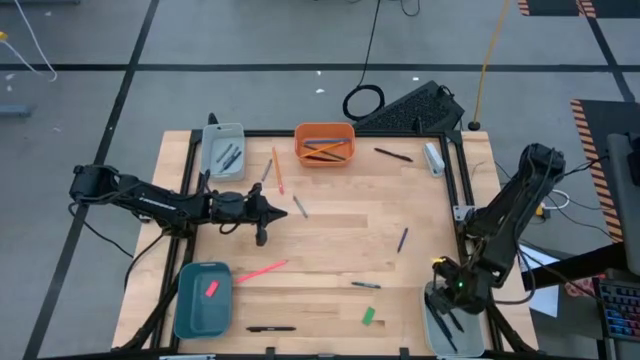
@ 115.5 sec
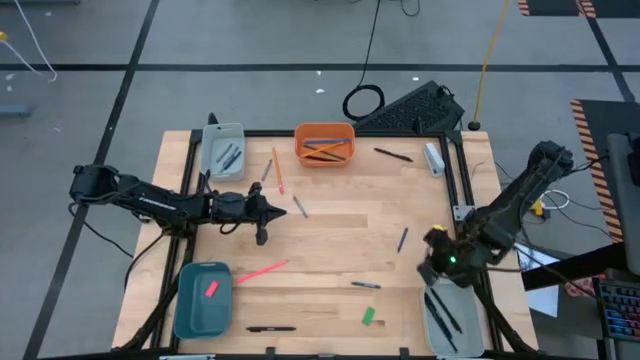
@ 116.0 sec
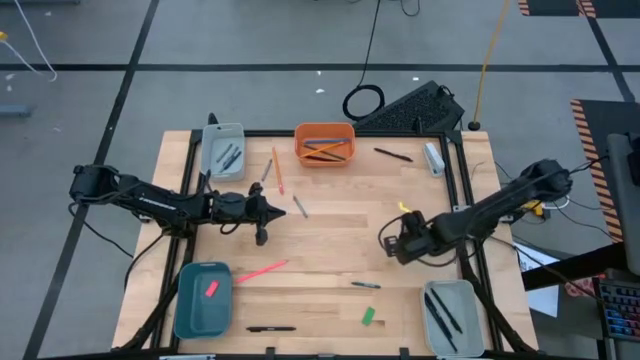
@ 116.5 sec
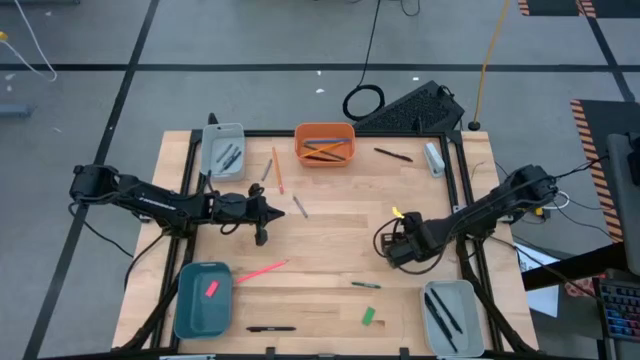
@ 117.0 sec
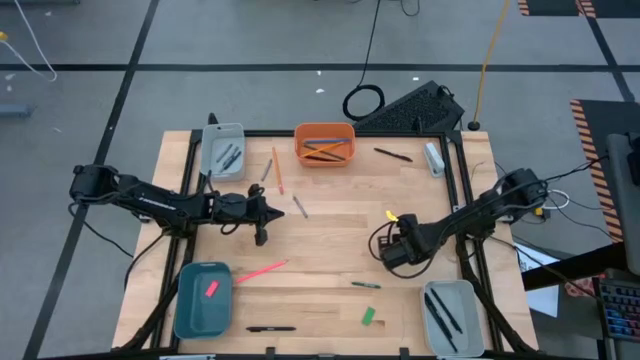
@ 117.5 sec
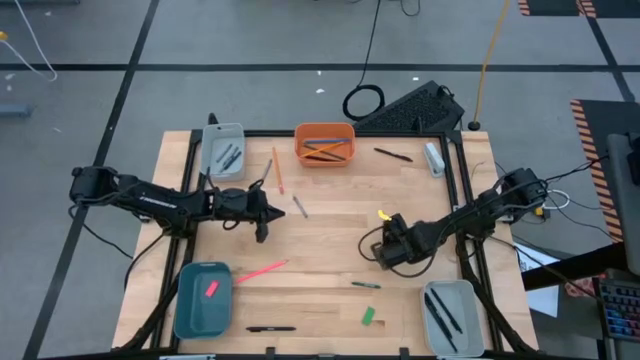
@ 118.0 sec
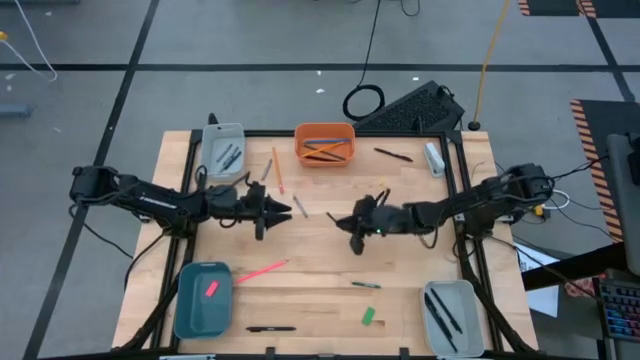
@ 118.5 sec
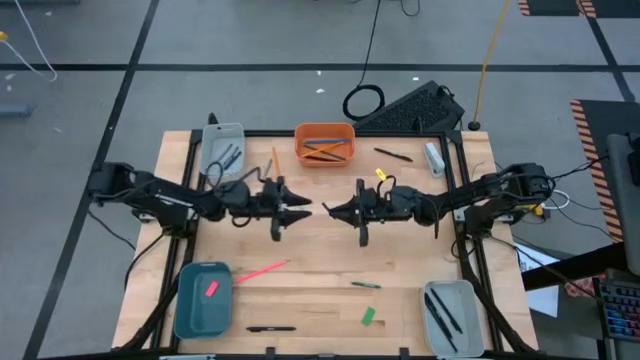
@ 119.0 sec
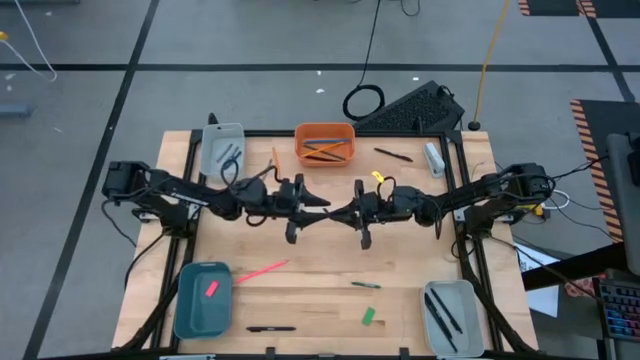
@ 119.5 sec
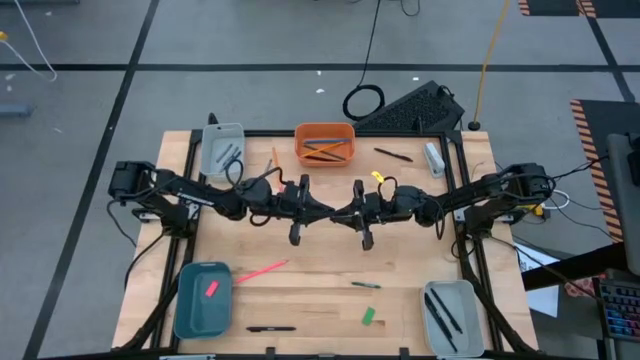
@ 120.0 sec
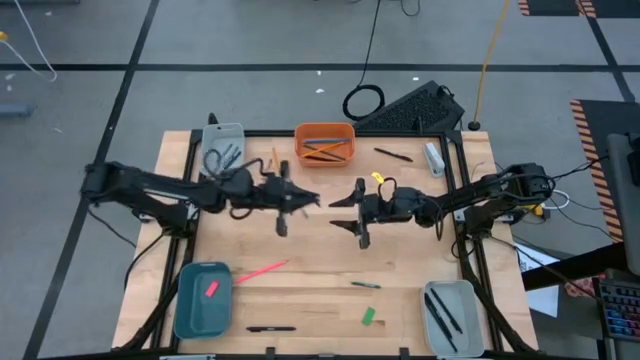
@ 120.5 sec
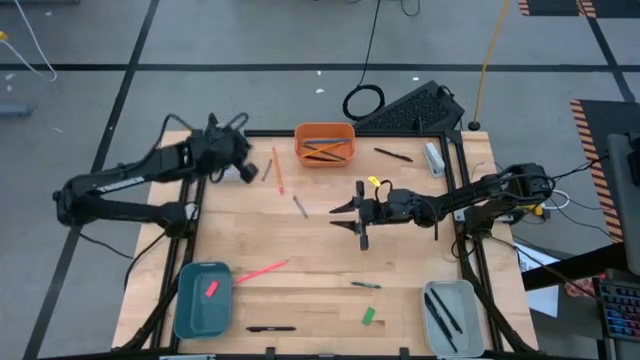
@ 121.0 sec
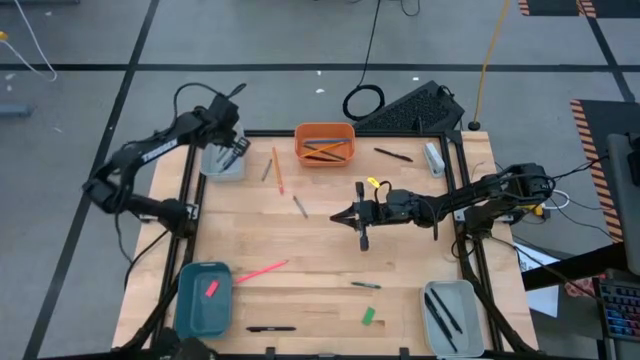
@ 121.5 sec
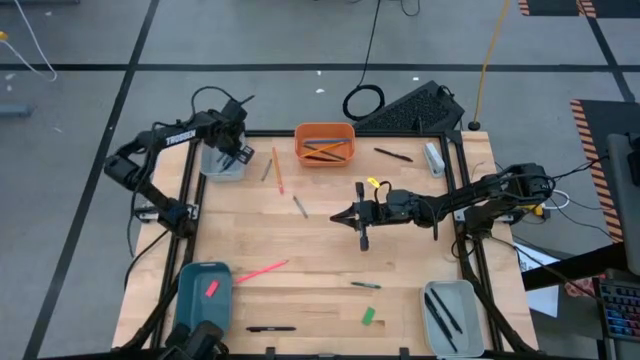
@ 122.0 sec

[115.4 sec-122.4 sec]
Task: Sort crayons/erasers/pens/pencils in bins
Put the blue crayon into the top gray bin

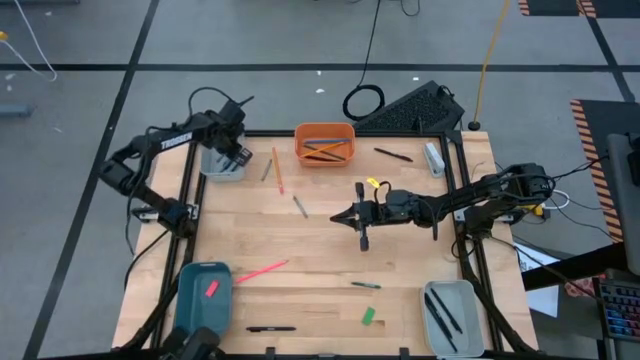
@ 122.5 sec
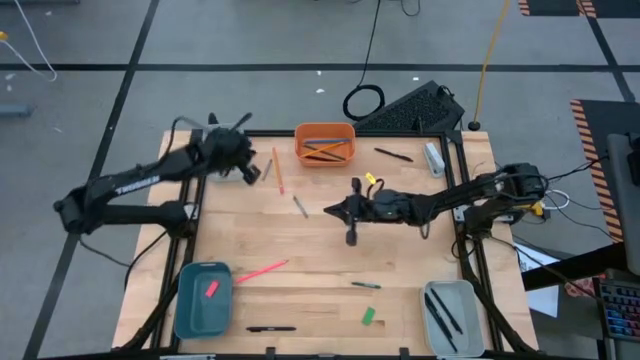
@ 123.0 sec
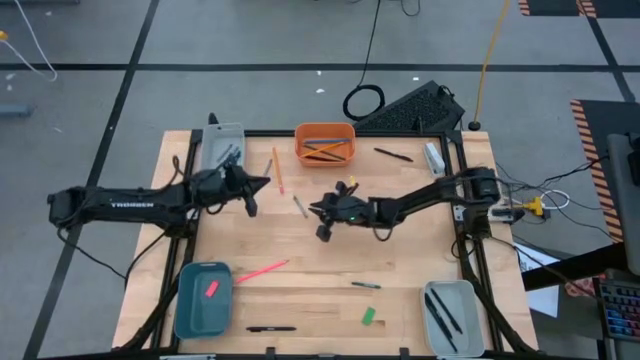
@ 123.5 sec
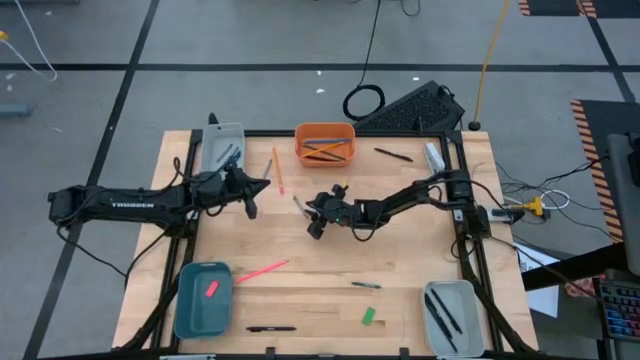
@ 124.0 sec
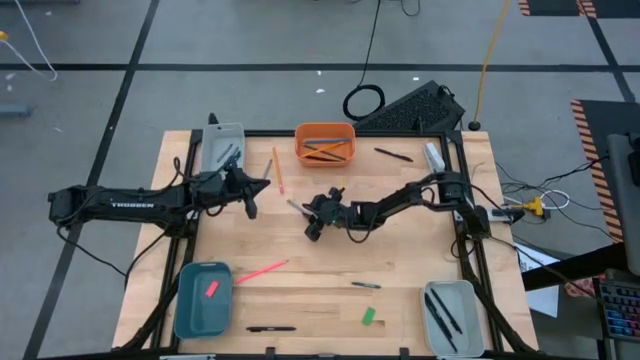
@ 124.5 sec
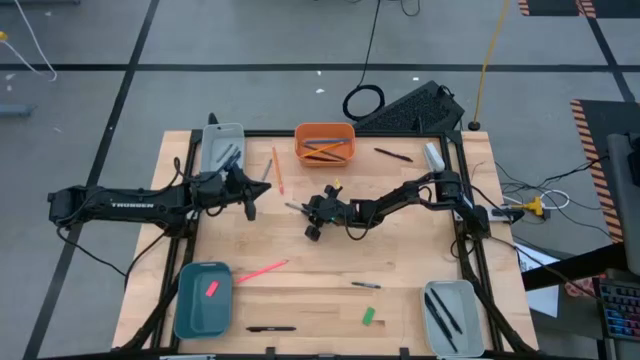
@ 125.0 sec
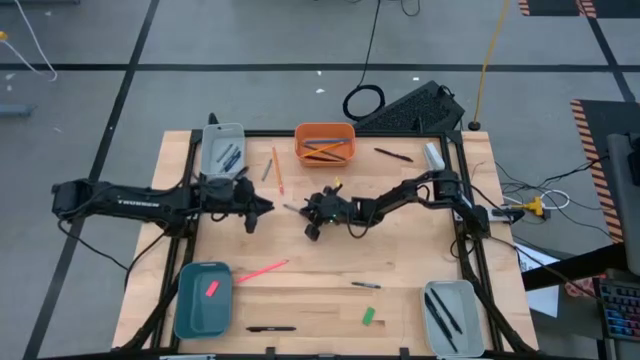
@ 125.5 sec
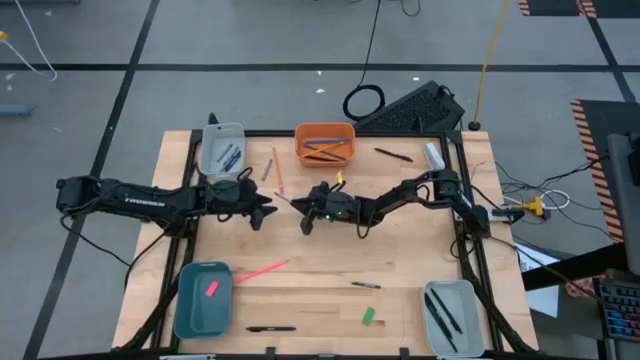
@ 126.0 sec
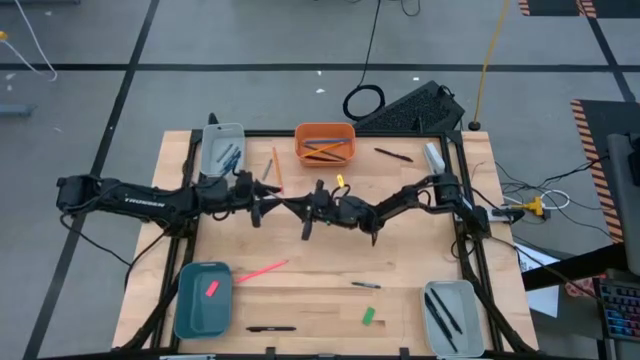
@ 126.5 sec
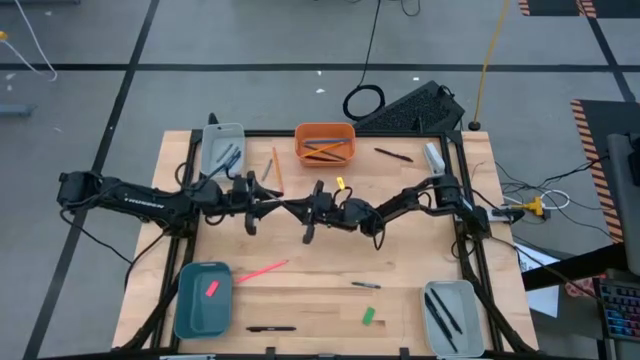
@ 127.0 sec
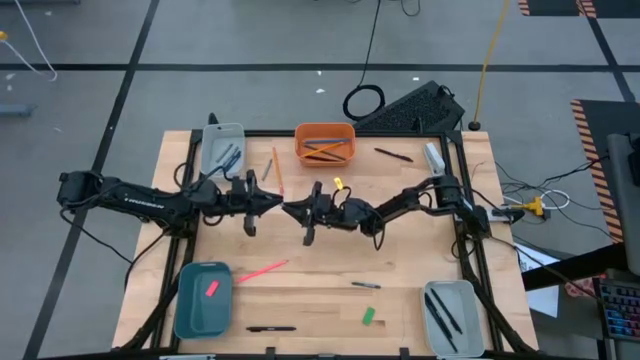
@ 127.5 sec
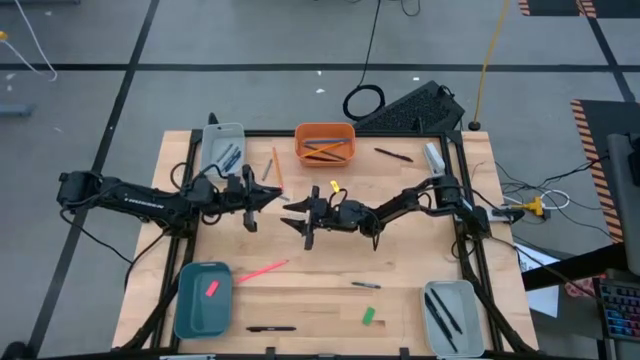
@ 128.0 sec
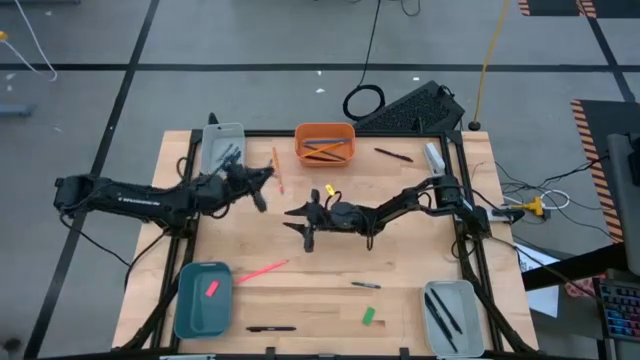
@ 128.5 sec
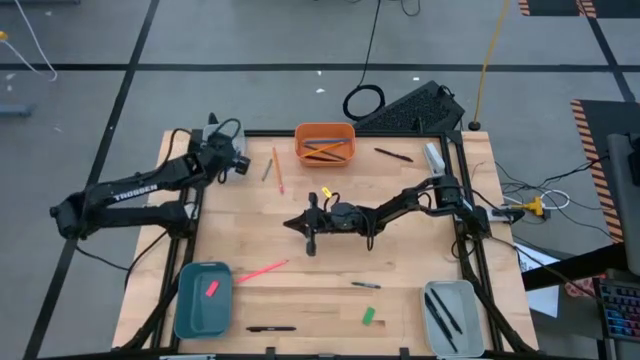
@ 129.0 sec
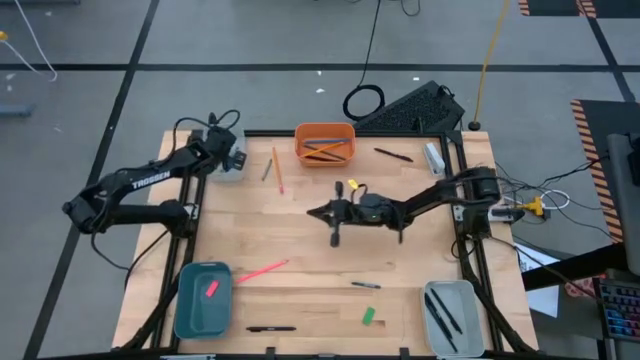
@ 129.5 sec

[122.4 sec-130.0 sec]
Put the gray crayon into the top gray bin

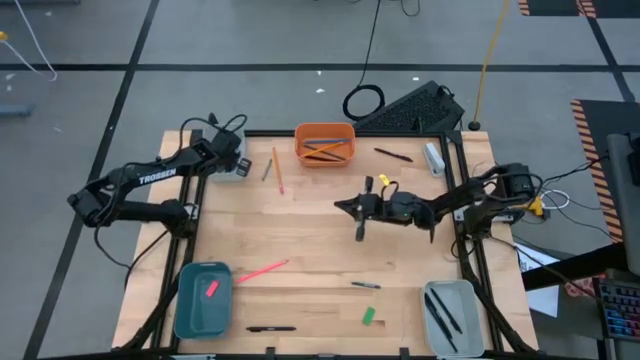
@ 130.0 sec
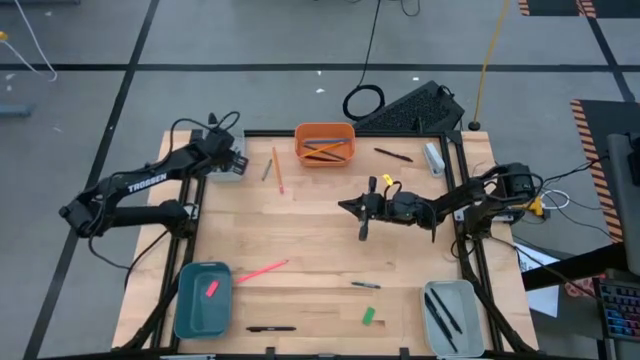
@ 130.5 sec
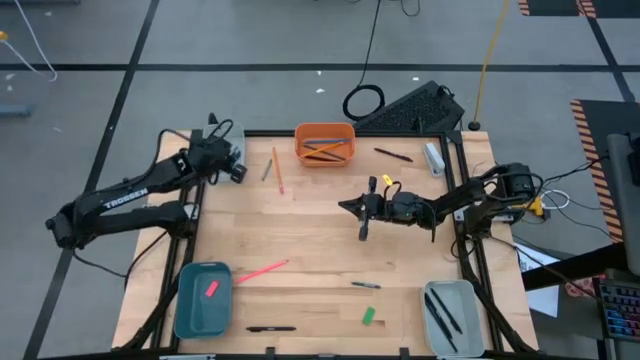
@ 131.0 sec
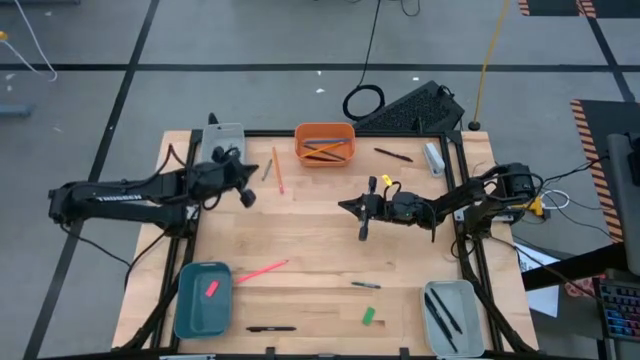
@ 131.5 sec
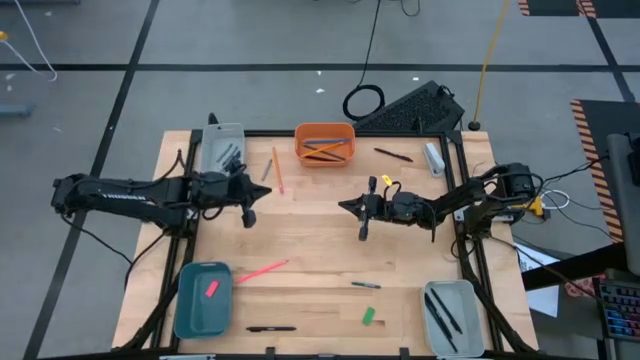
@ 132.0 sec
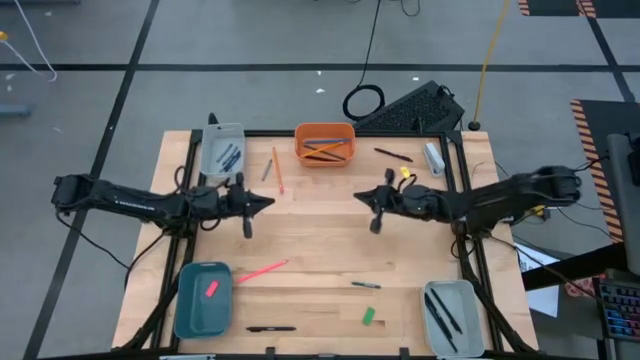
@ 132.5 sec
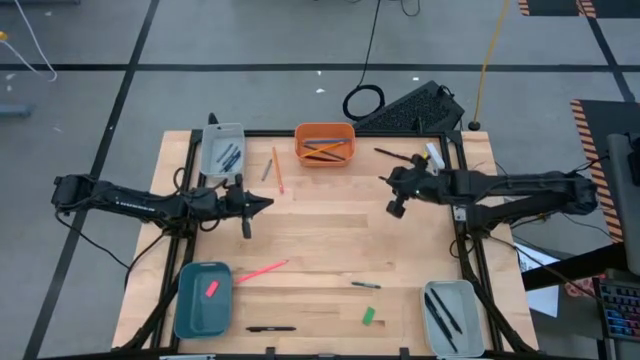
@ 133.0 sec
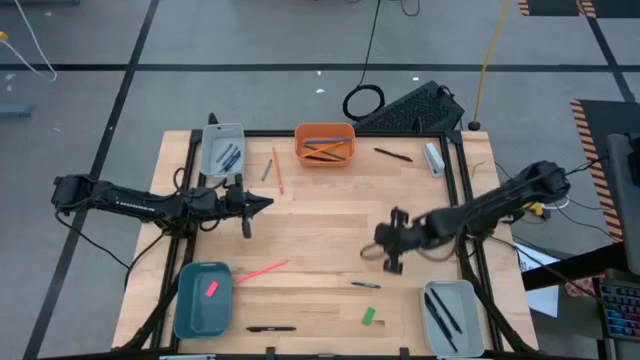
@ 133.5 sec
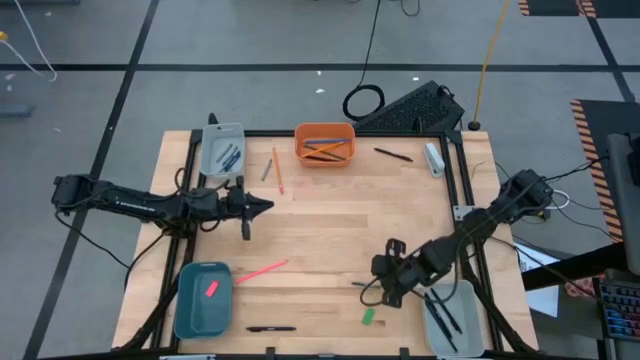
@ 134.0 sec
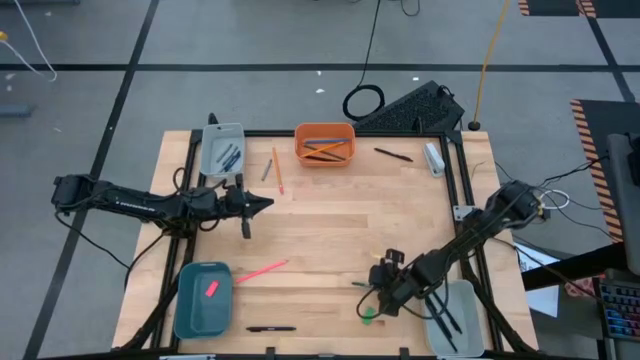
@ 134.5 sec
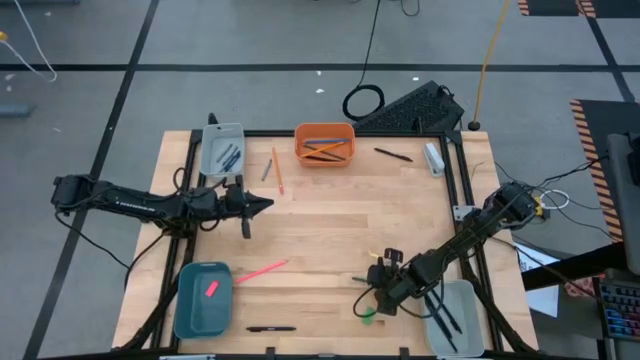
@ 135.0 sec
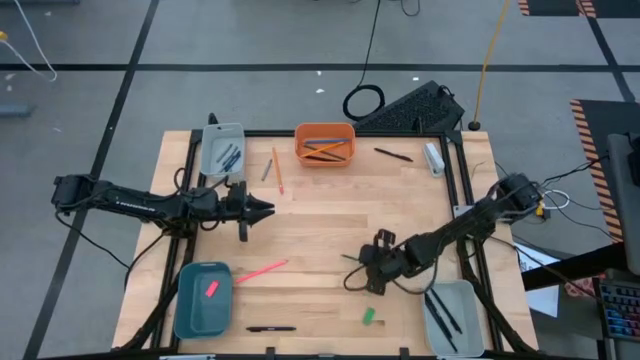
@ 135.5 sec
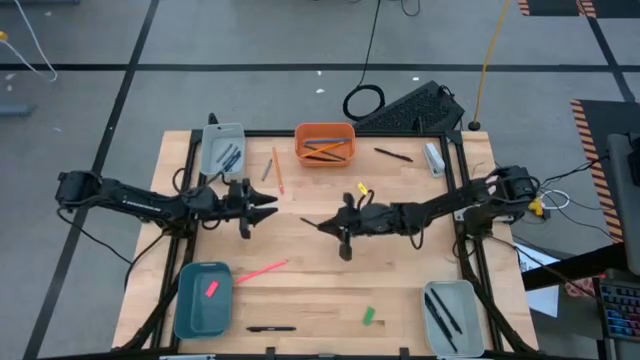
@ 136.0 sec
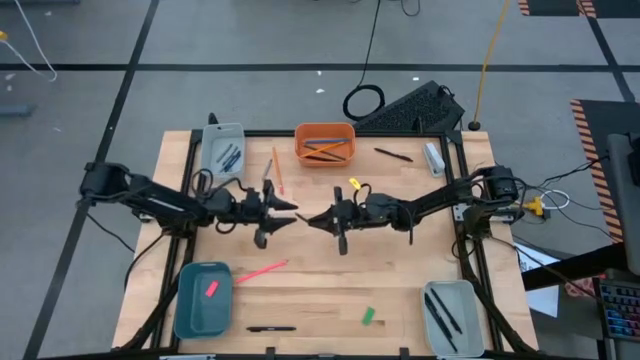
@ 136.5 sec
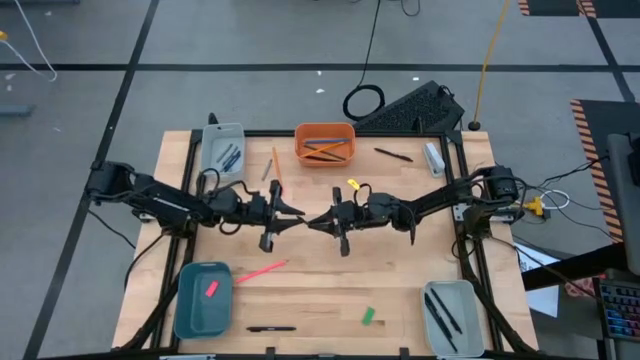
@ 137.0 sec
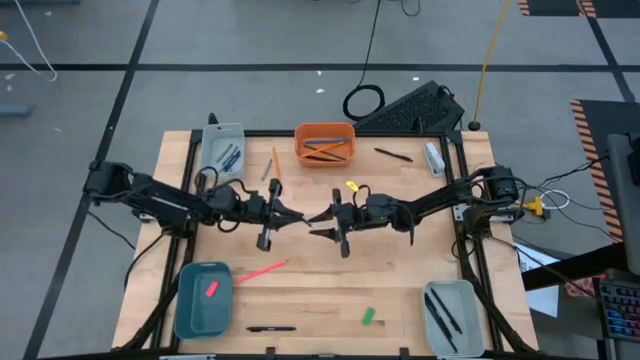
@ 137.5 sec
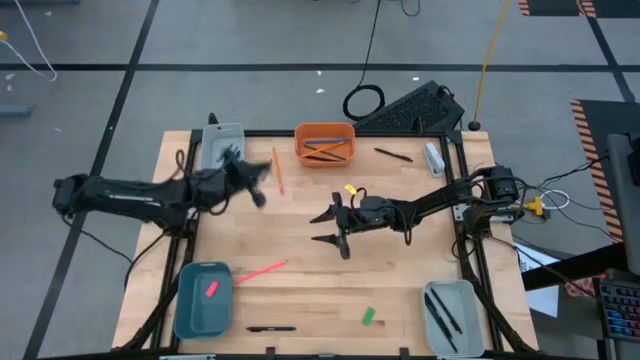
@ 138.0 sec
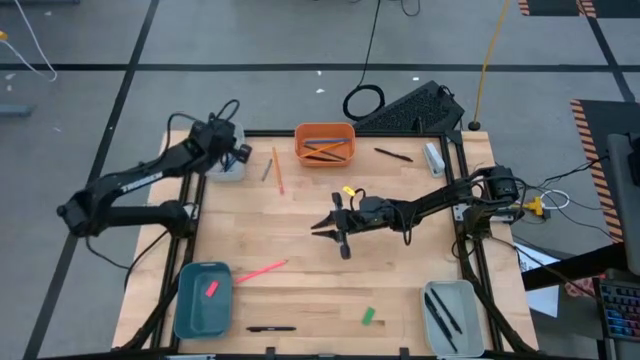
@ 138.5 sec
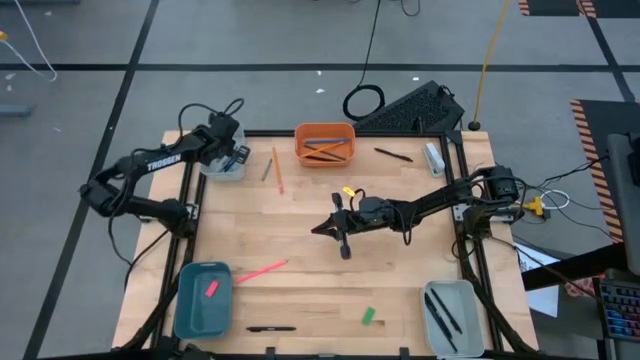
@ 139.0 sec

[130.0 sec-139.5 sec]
Put the green crayon into the top gray bin
